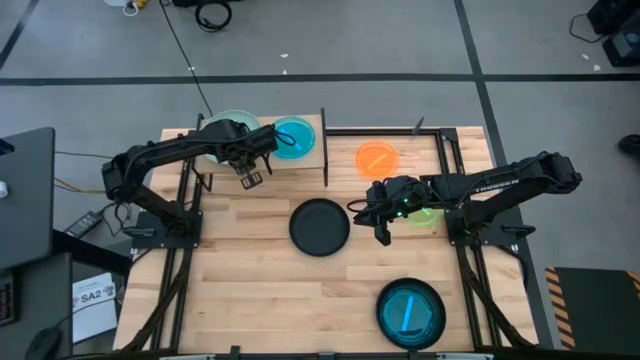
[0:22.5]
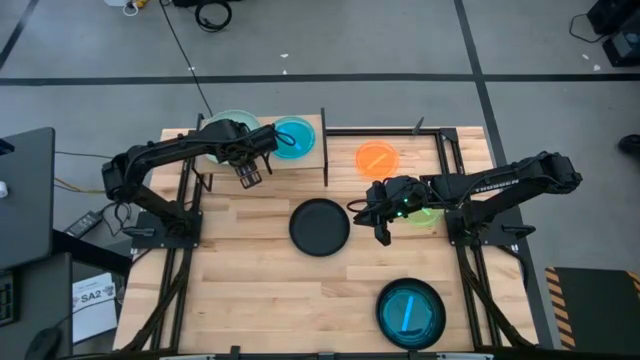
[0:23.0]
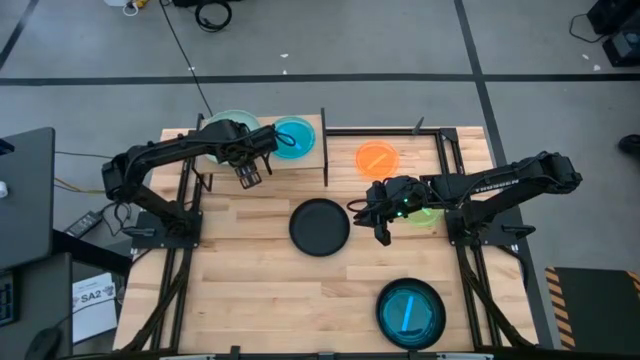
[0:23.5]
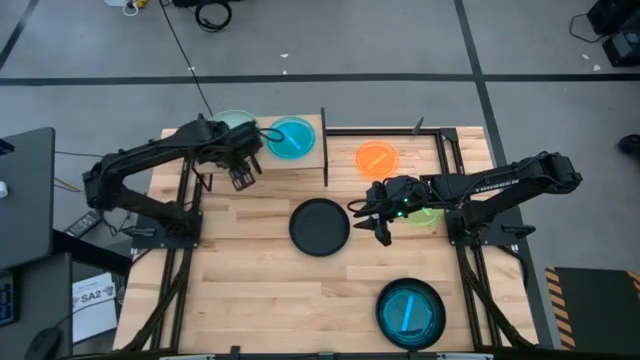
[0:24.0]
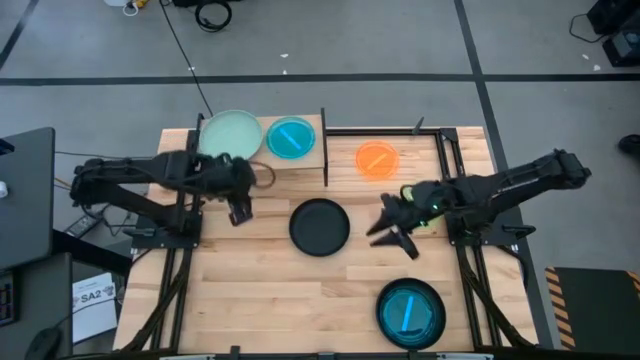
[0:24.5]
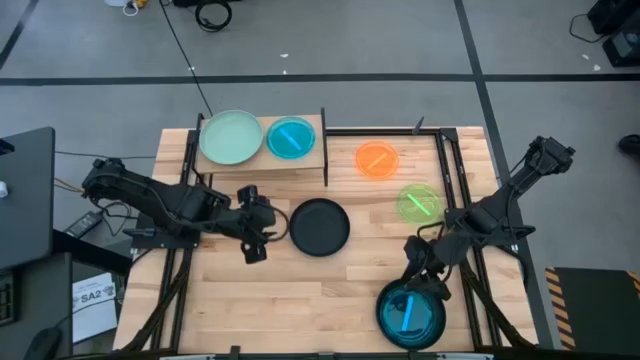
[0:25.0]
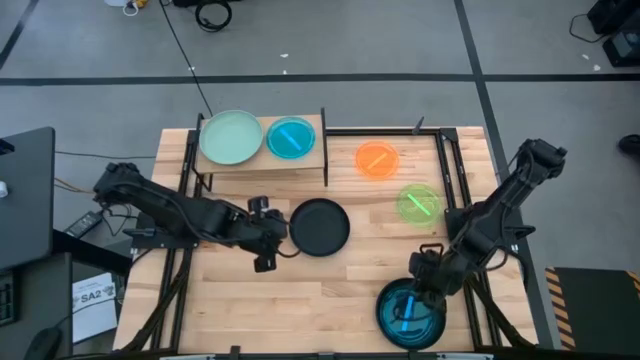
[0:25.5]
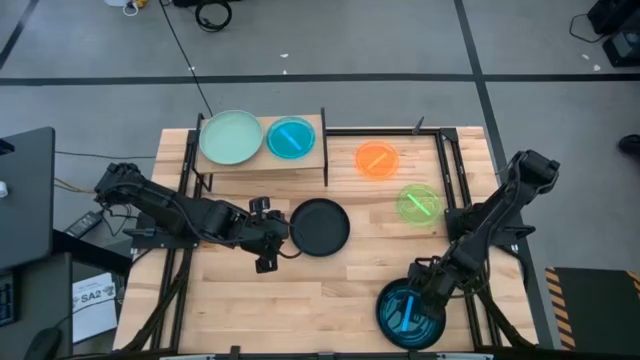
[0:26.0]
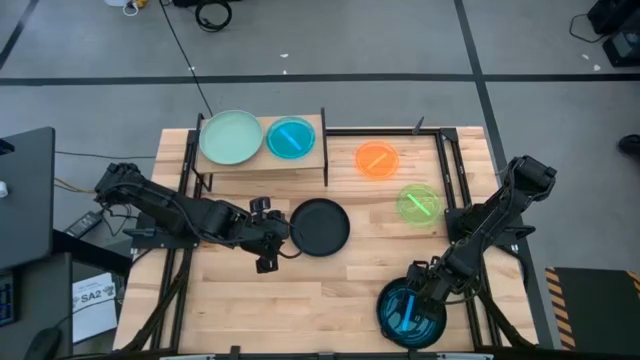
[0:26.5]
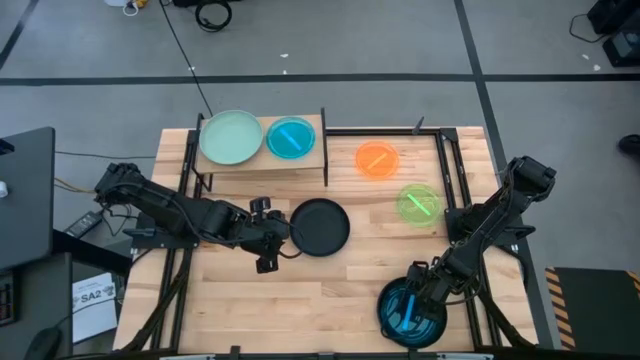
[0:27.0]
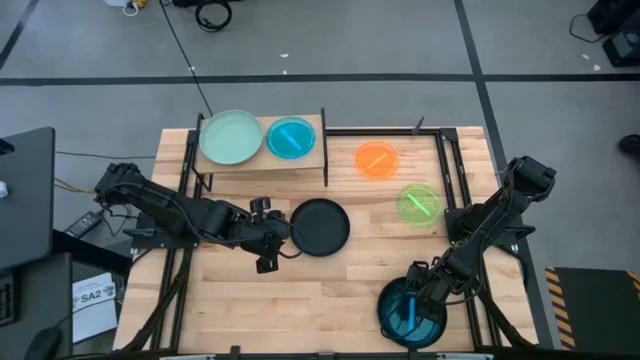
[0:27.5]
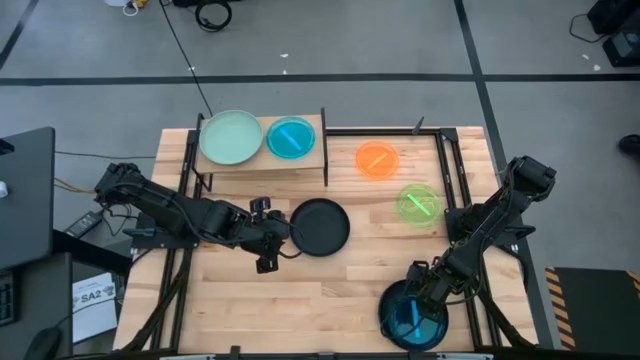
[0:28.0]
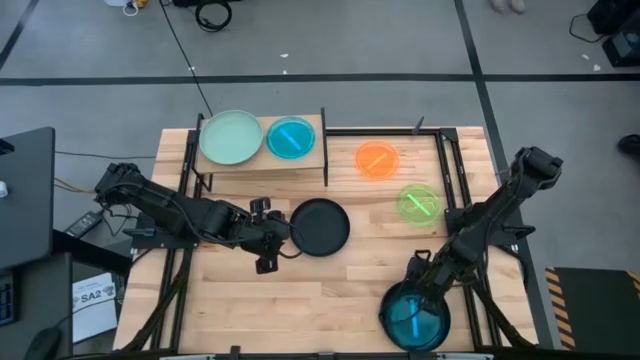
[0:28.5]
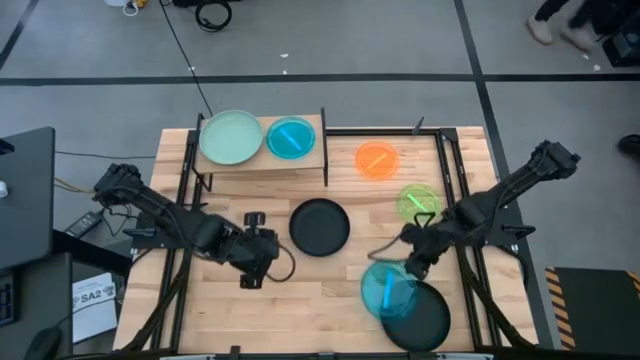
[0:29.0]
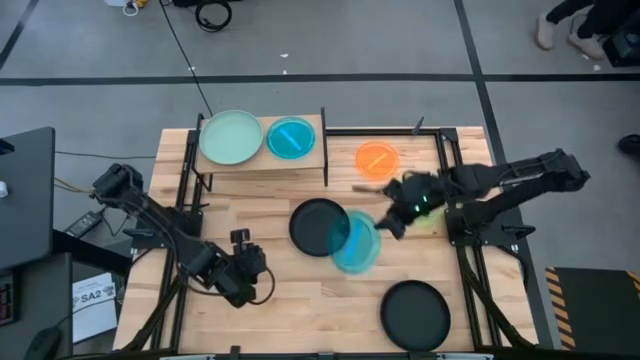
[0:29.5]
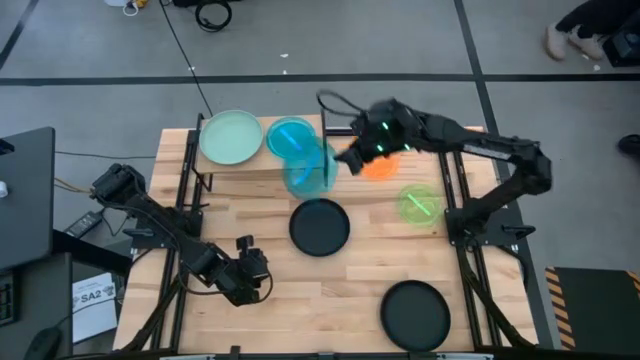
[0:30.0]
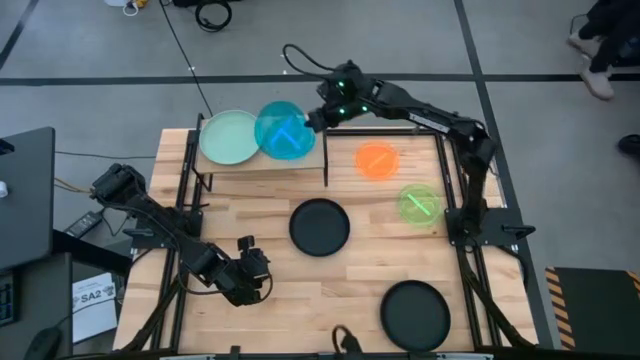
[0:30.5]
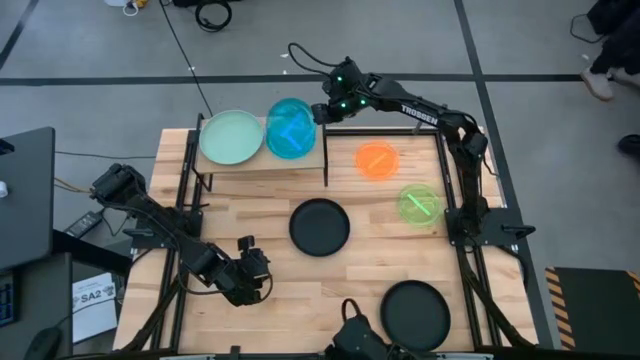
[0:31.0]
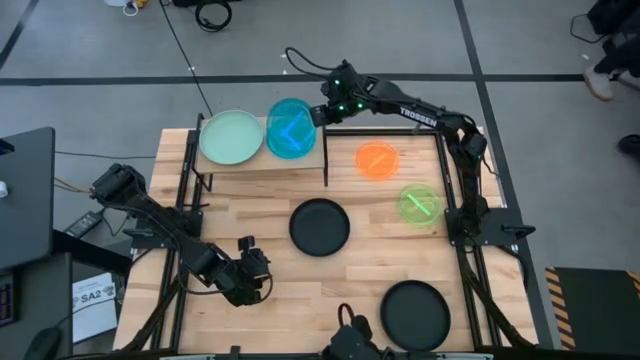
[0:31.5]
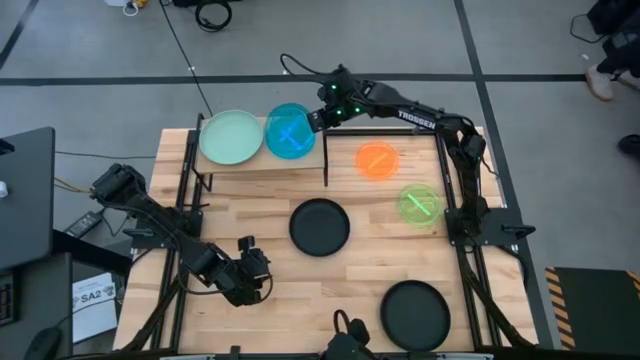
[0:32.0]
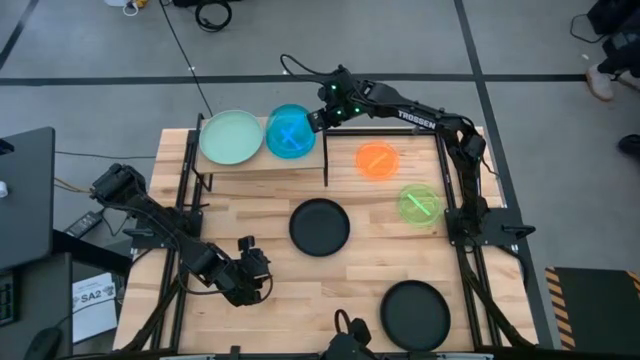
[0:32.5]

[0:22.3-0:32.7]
Task: Place and stack plates onto a shelf
Stack the blue plate on top of the blue plate on the shelf

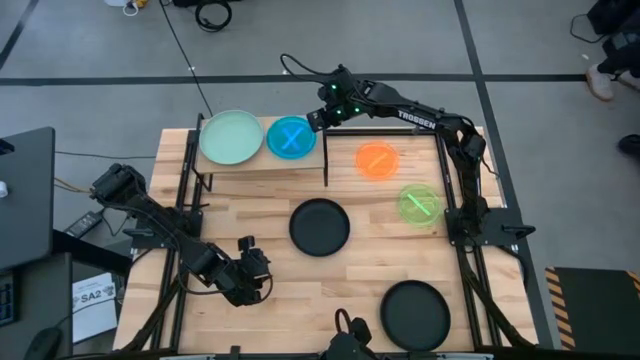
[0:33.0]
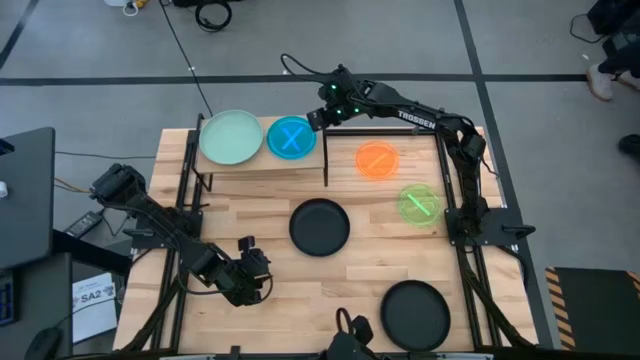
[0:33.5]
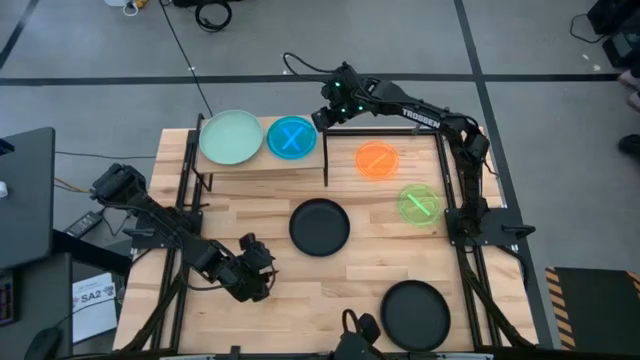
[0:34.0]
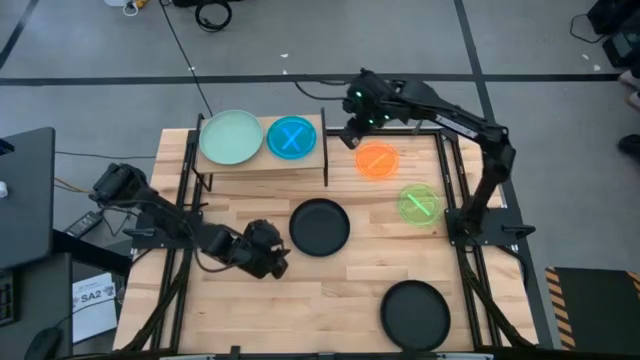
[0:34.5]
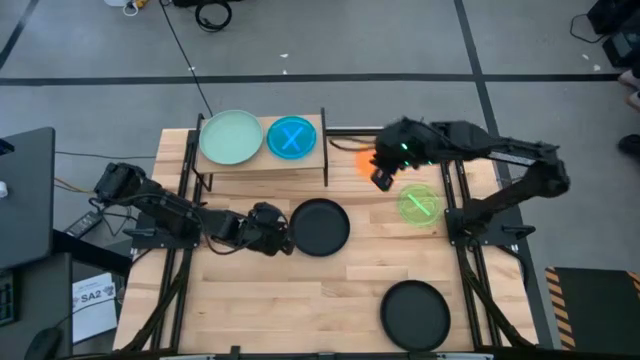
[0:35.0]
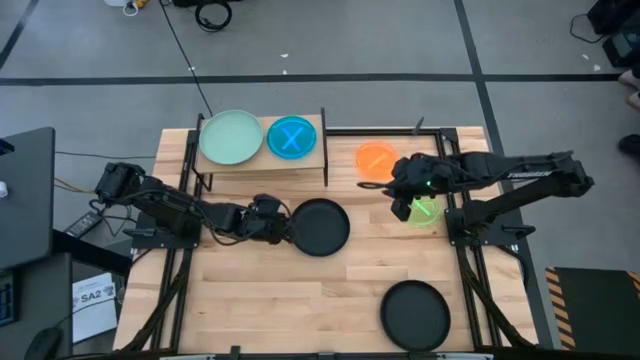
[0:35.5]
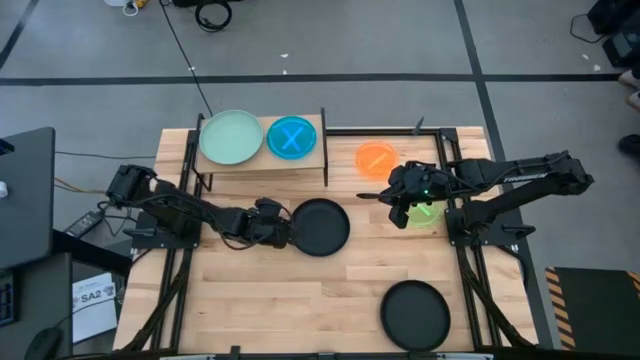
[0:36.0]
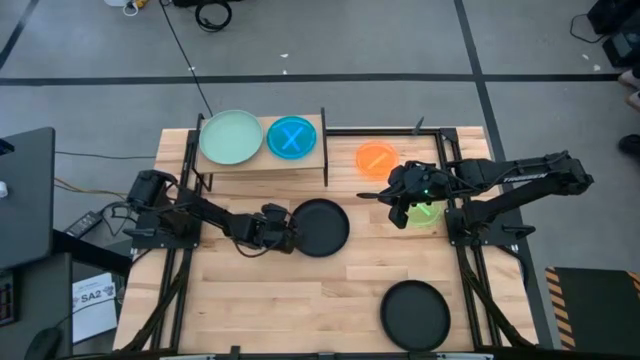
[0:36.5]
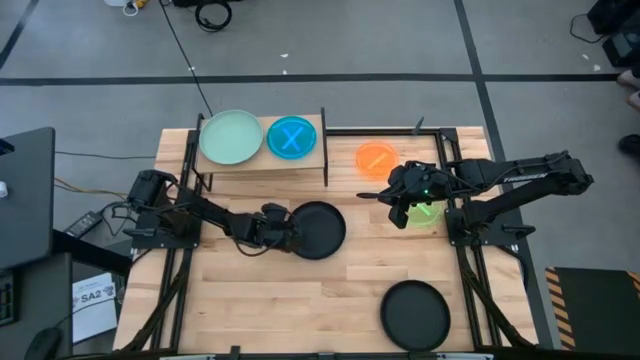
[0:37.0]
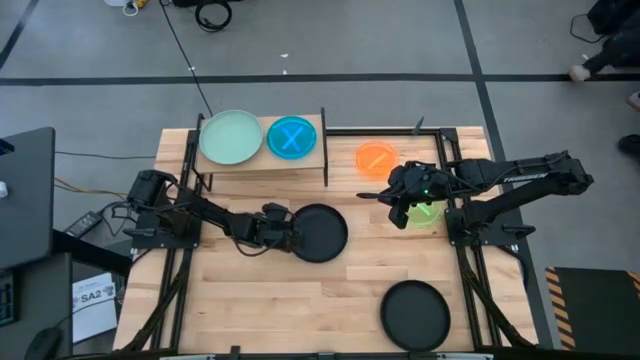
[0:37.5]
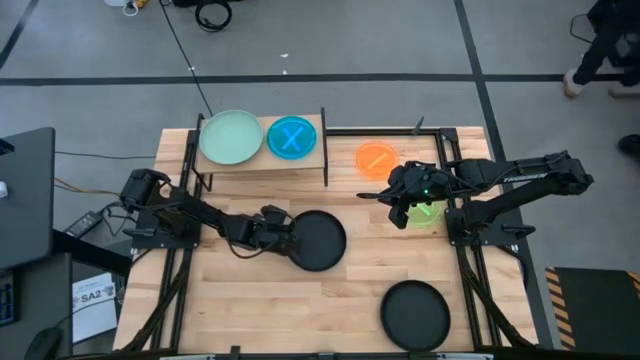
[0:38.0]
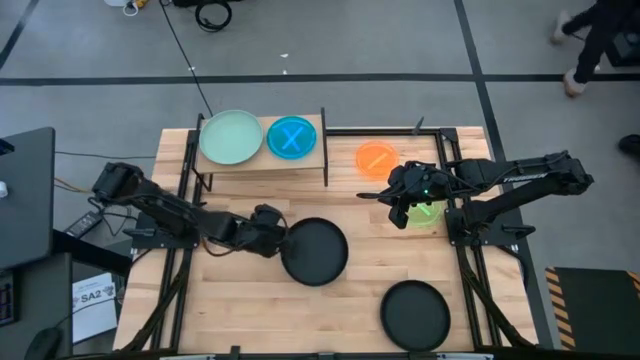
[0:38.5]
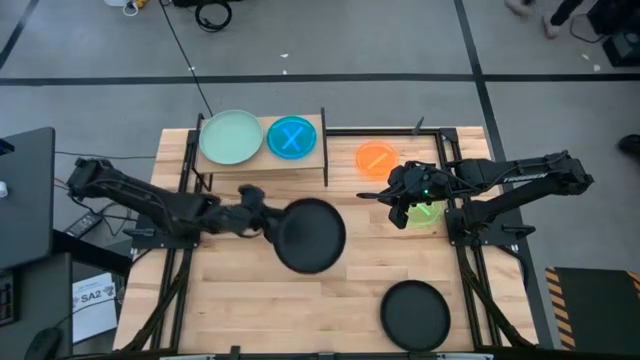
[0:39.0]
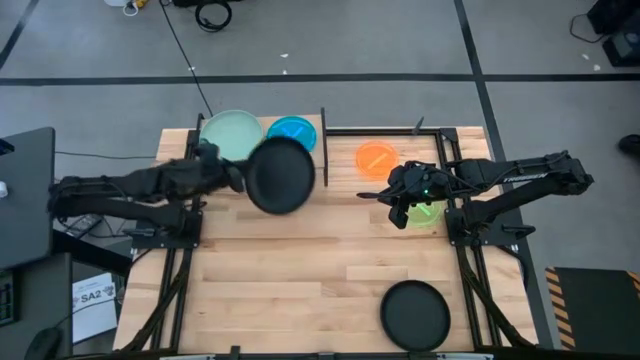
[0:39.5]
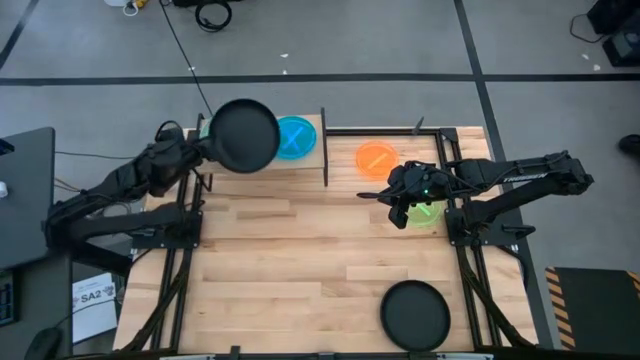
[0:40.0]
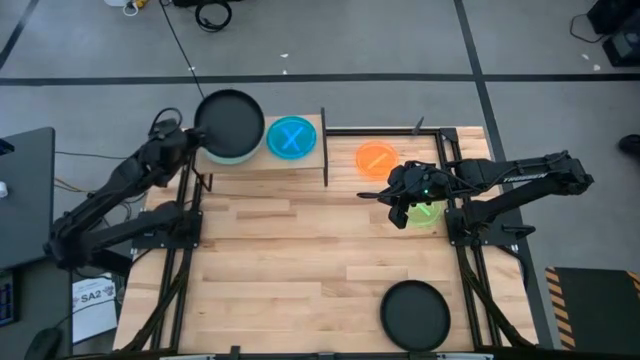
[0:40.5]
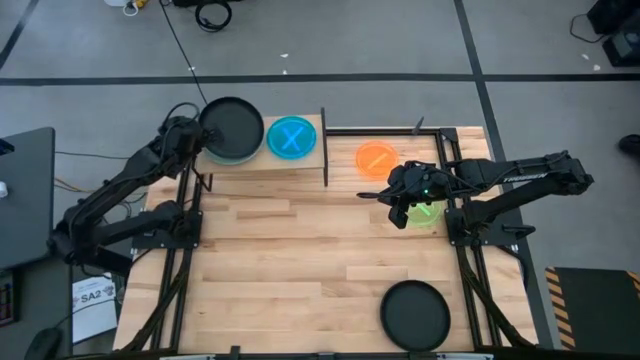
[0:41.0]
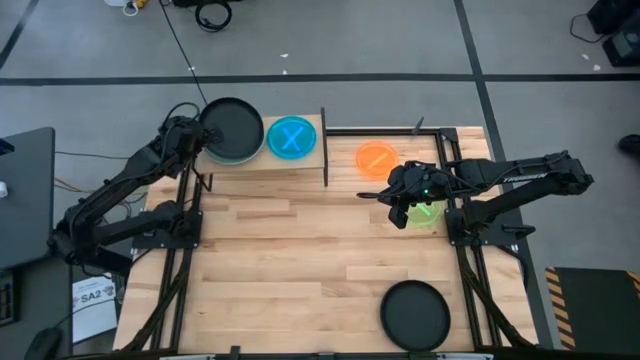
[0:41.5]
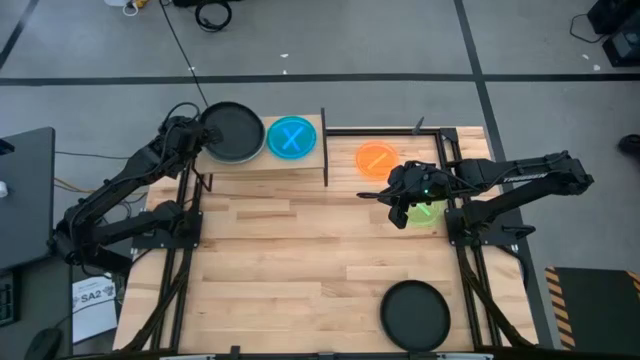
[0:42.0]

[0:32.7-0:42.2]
Stack the top black plate on top of the light blue plate on the shelf
